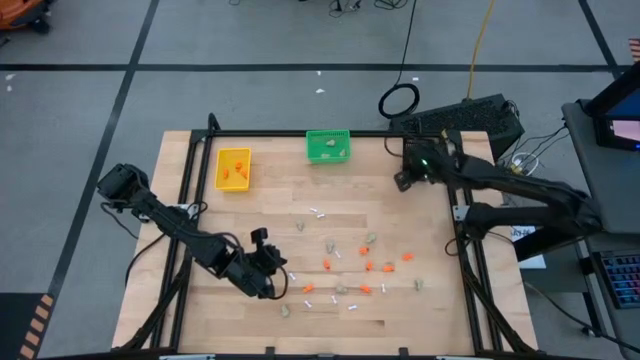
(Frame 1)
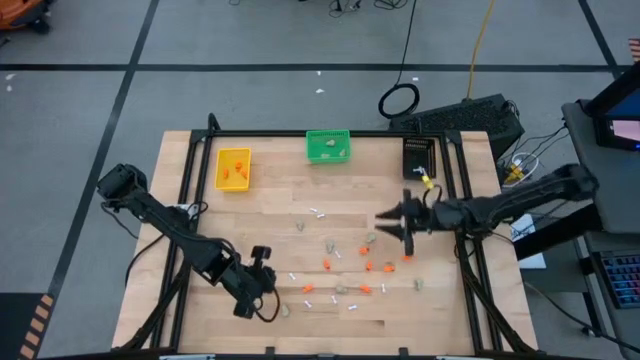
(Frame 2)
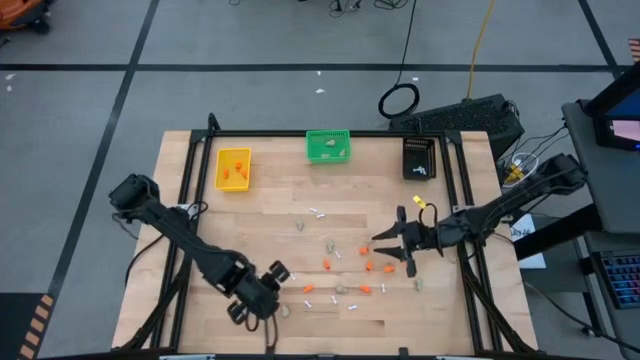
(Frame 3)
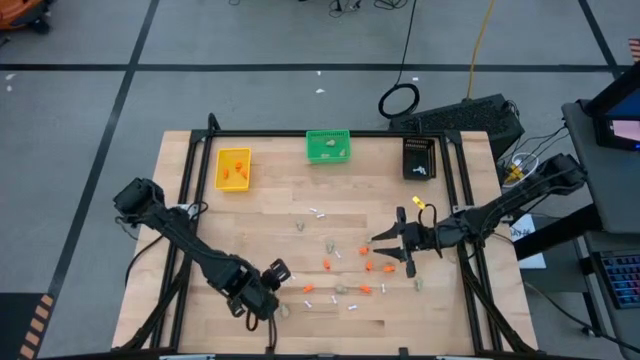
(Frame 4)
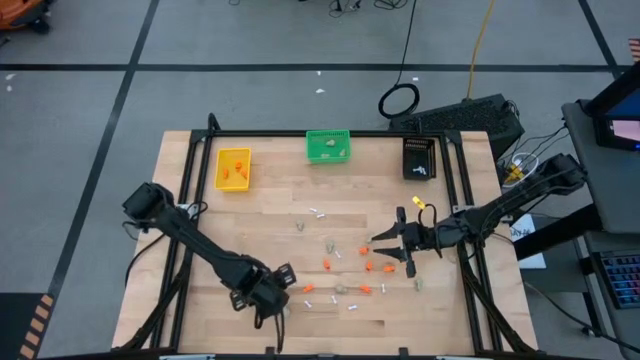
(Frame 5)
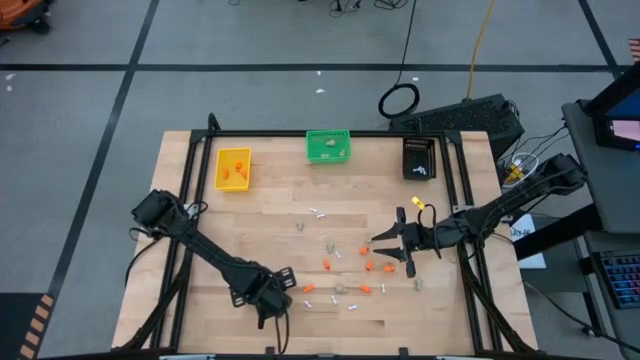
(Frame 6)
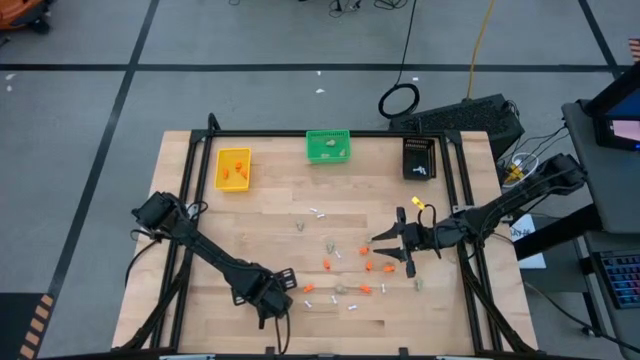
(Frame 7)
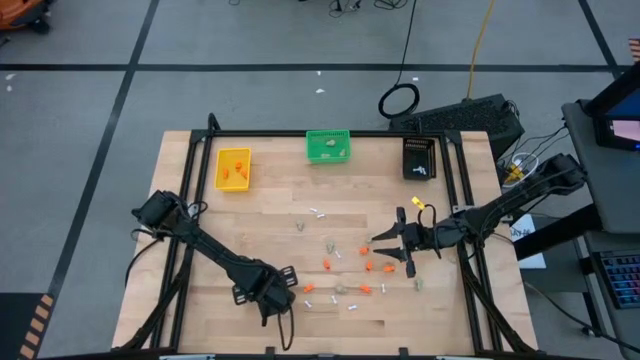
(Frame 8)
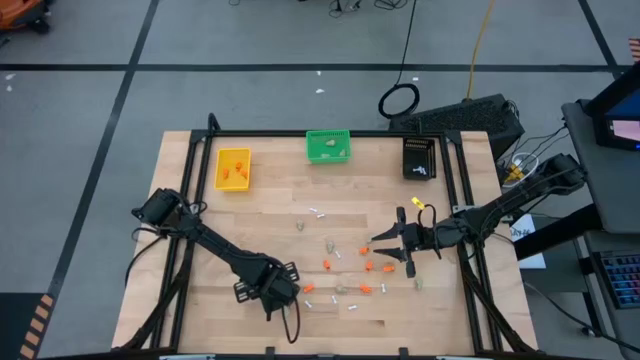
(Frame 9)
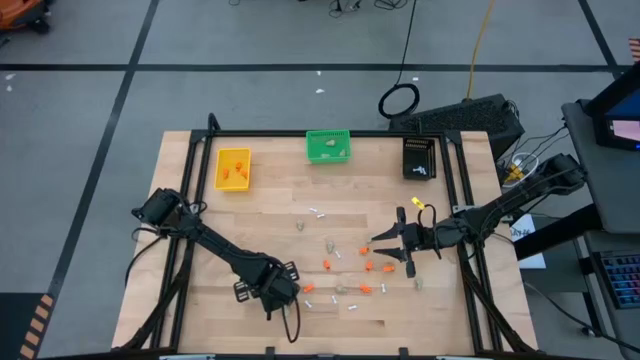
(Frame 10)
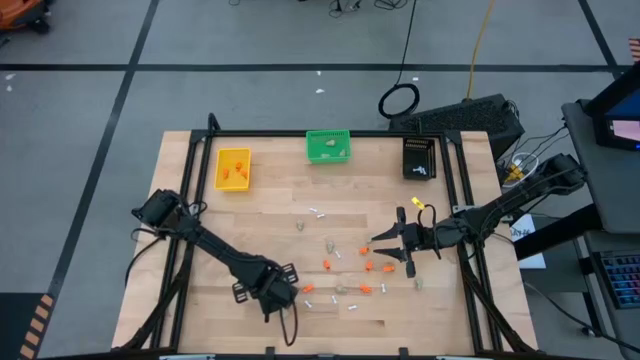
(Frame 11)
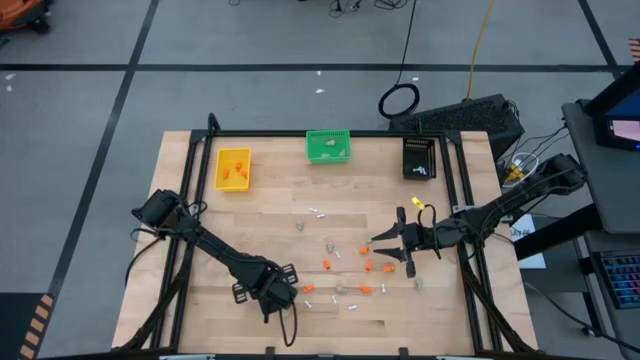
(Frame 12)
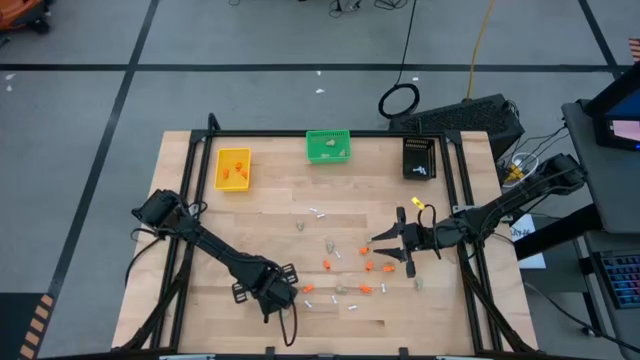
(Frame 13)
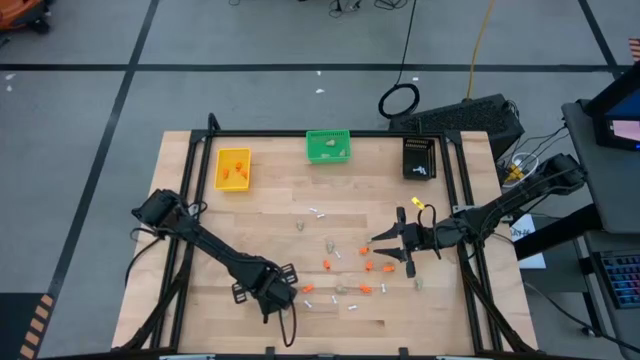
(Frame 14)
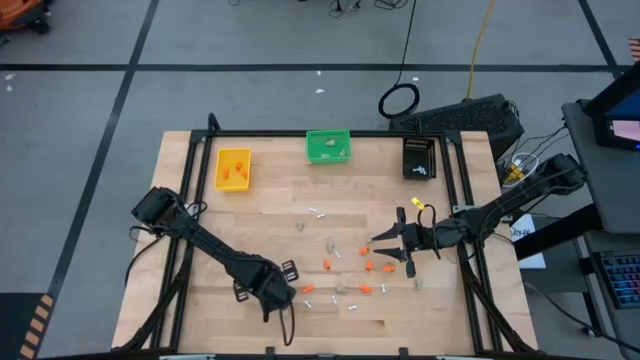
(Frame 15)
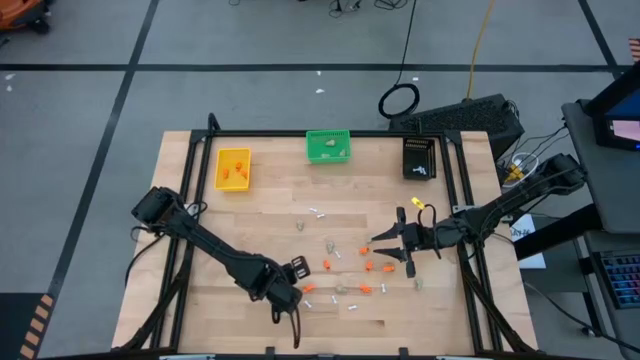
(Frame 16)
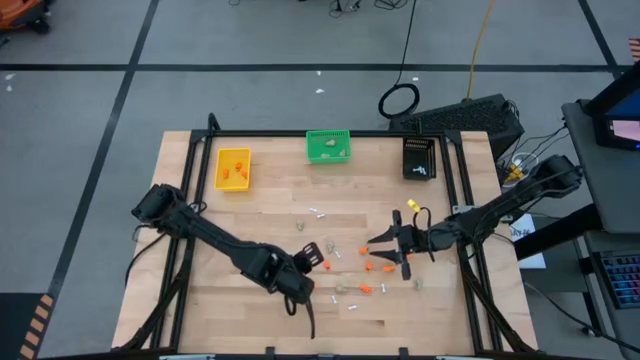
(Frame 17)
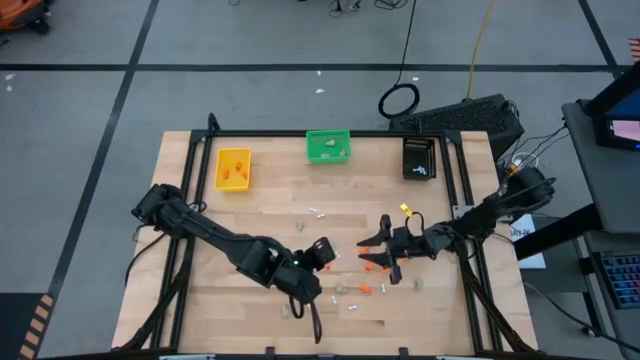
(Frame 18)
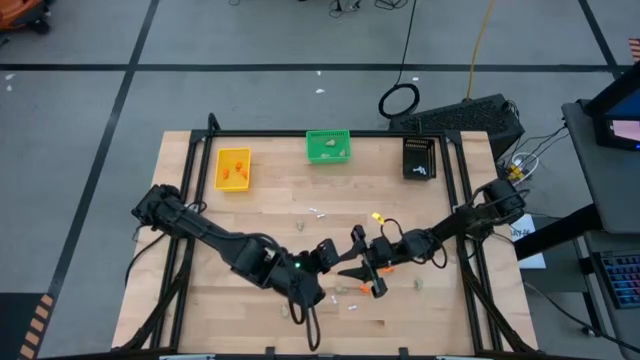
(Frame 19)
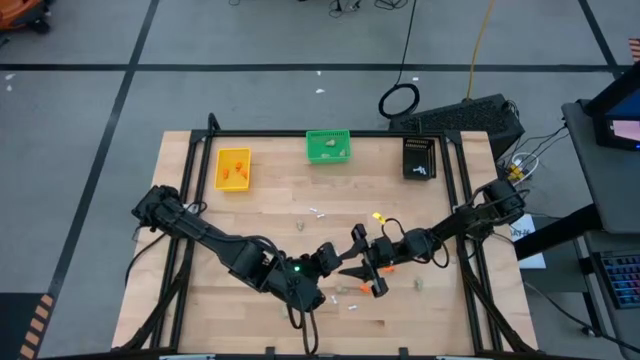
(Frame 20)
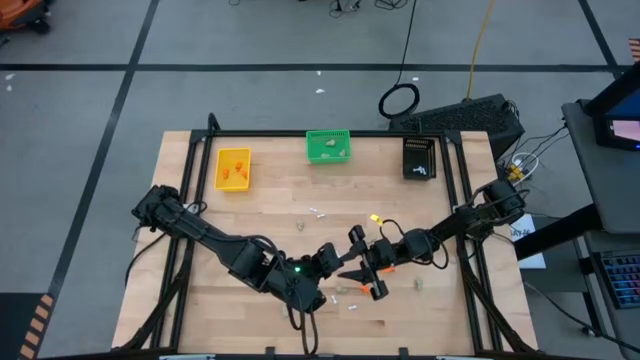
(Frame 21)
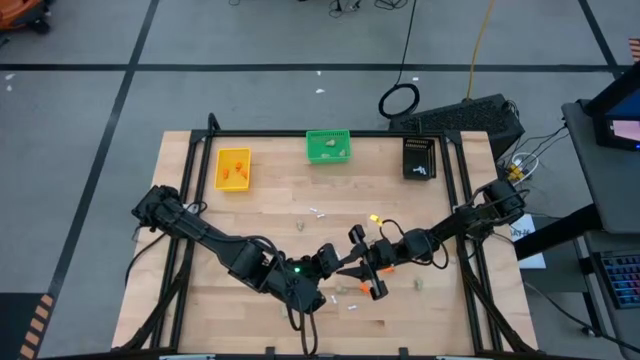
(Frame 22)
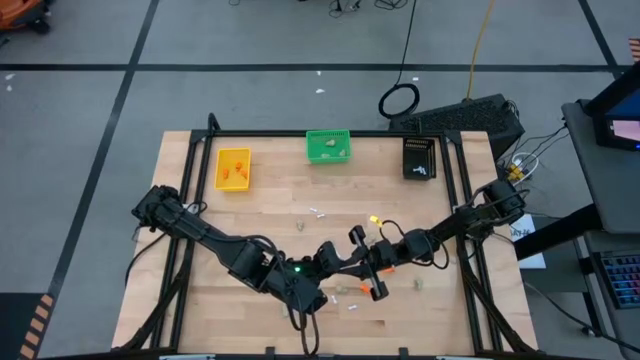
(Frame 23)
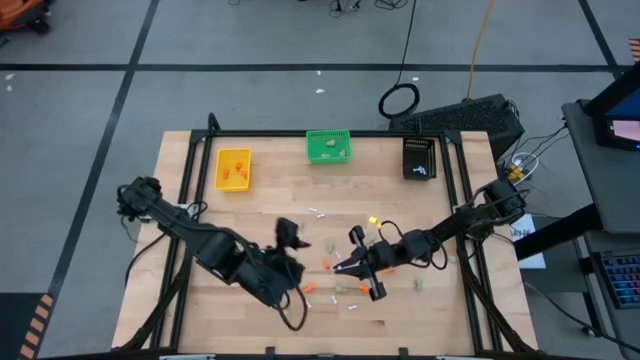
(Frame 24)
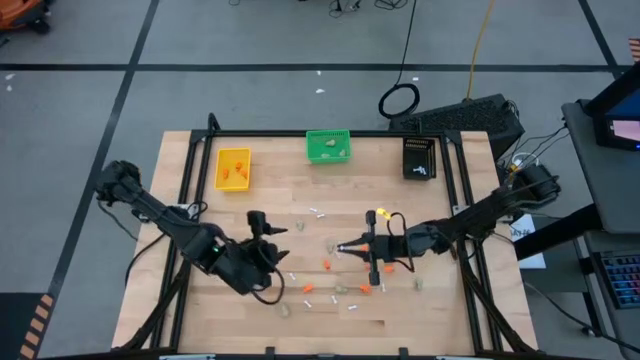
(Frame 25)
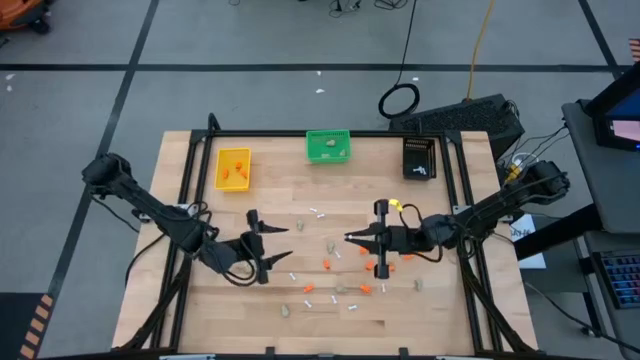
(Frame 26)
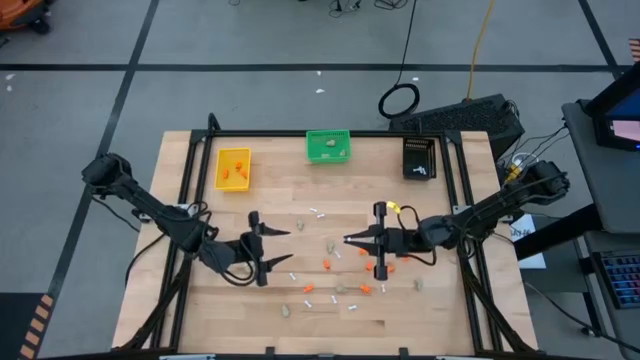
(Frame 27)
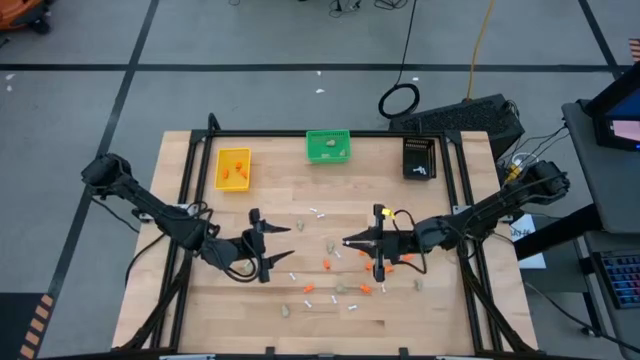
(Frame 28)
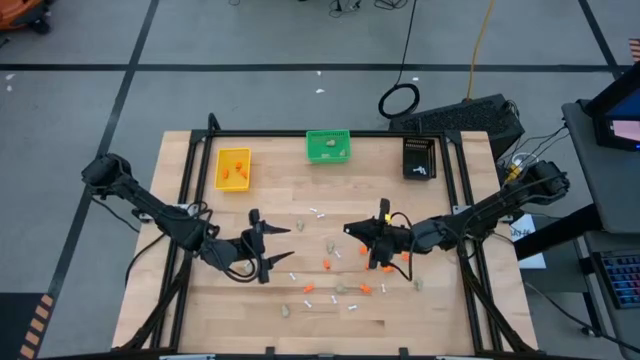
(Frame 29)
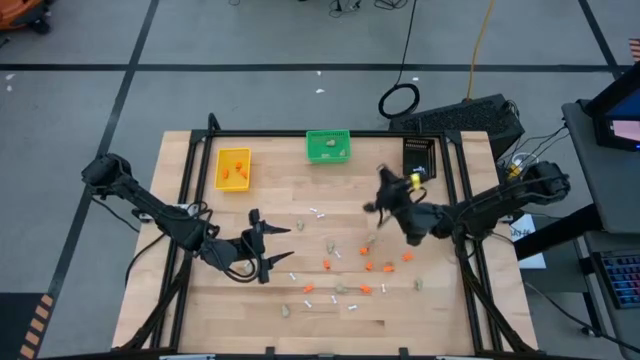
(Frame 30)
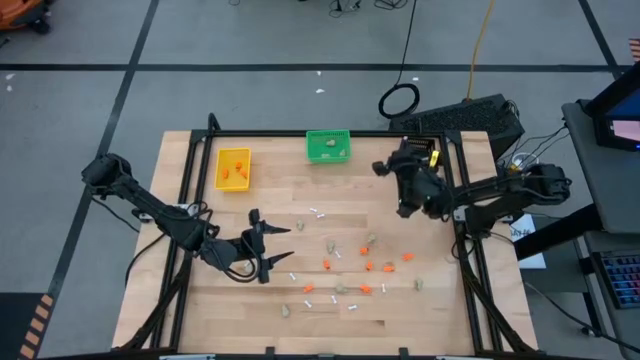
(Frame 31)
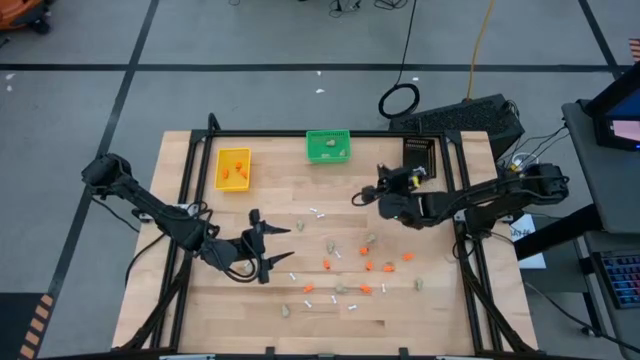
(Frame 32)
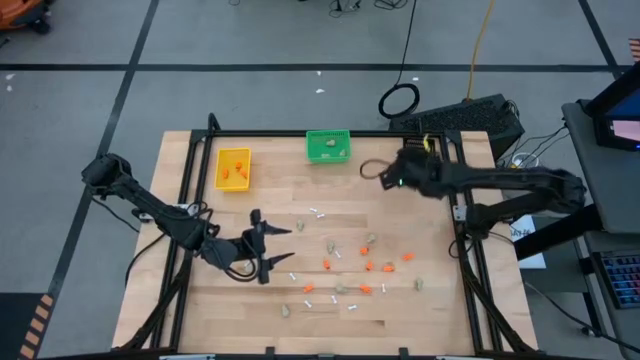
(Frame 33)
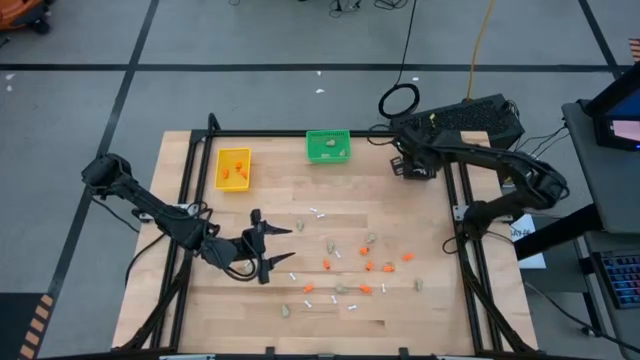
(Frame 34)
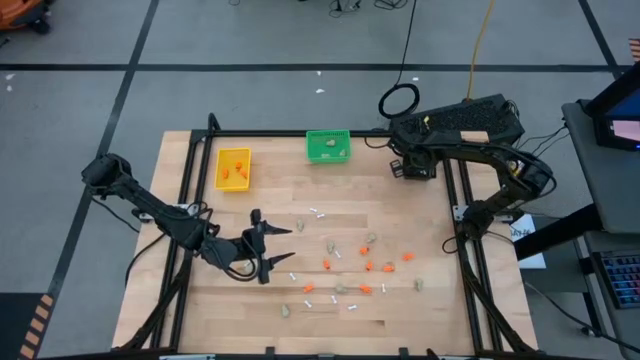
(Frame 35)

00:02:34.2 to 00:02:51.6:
Task: Sort Halloween decoration
Put the white bone toy into the black bin

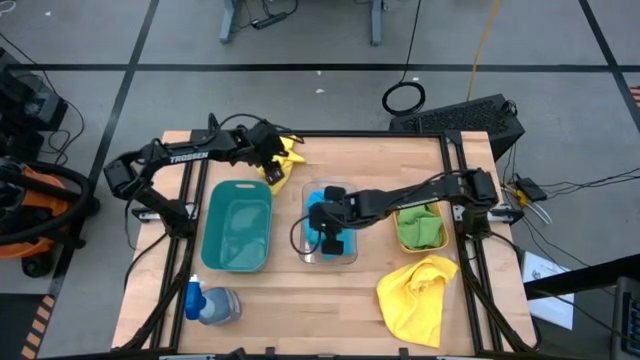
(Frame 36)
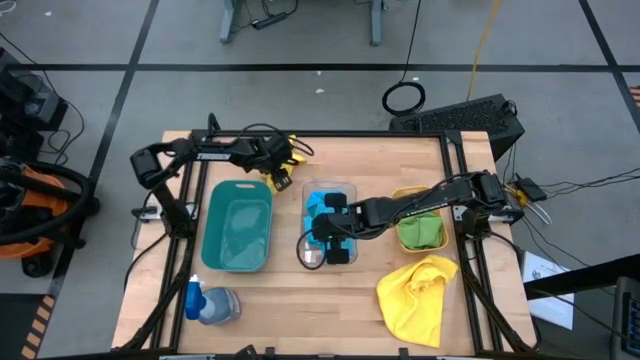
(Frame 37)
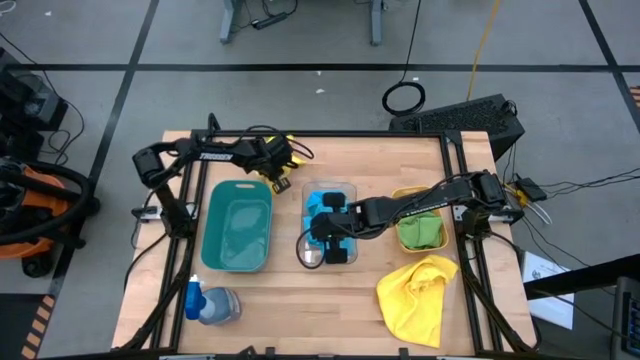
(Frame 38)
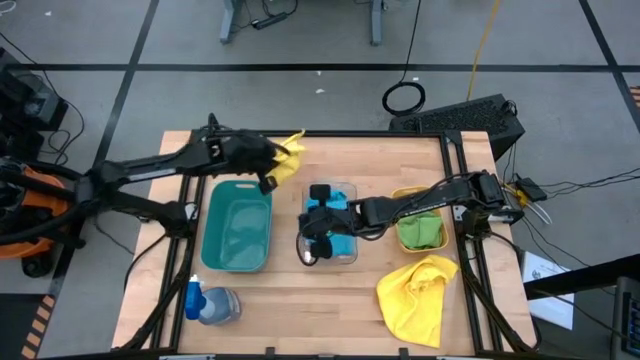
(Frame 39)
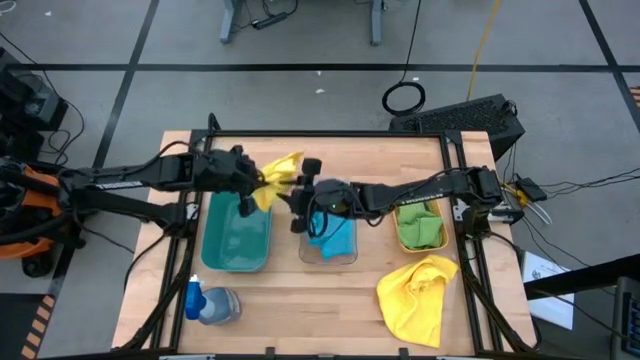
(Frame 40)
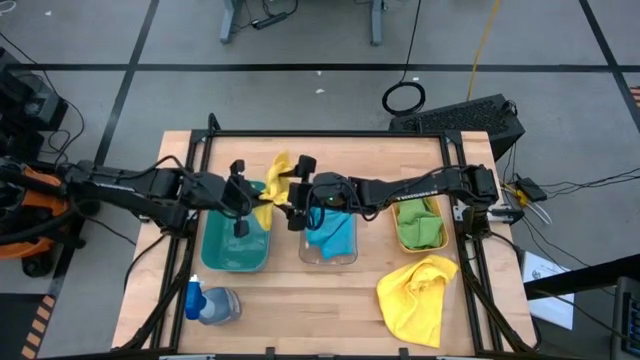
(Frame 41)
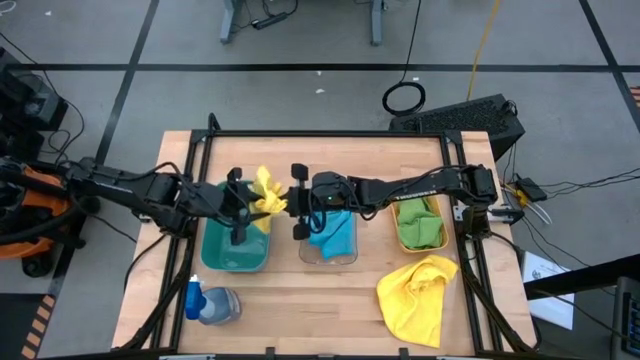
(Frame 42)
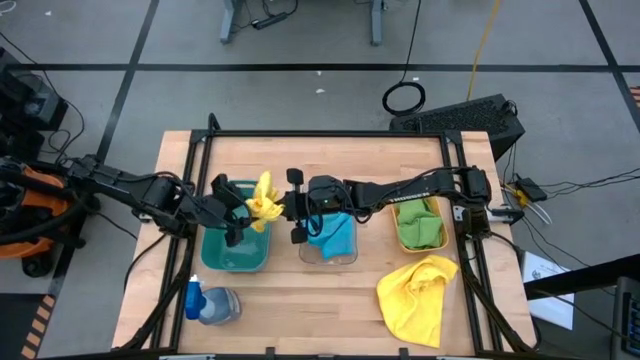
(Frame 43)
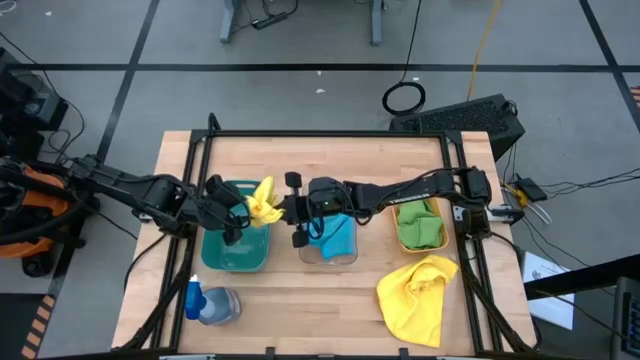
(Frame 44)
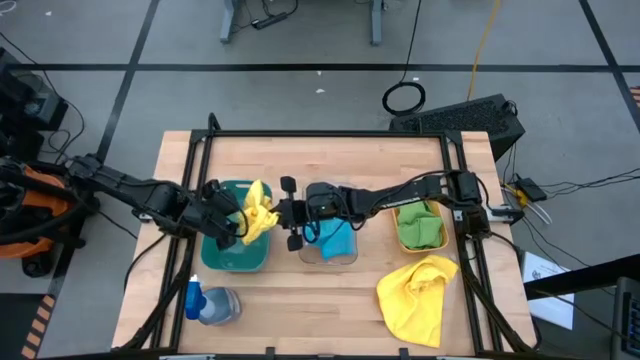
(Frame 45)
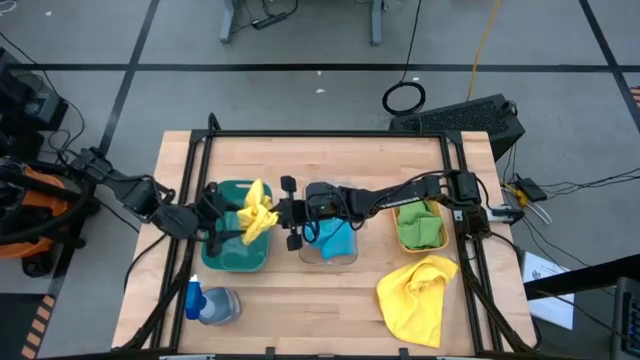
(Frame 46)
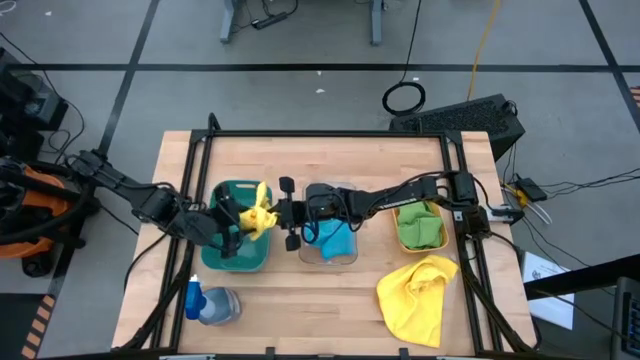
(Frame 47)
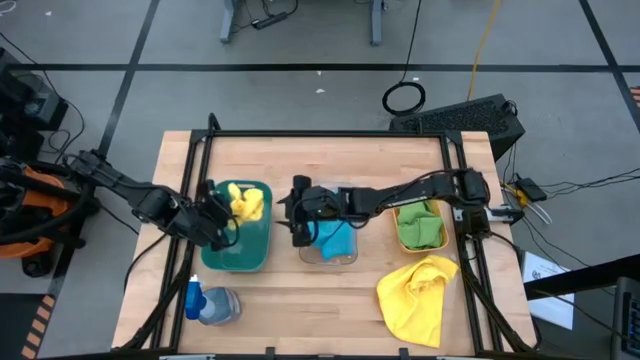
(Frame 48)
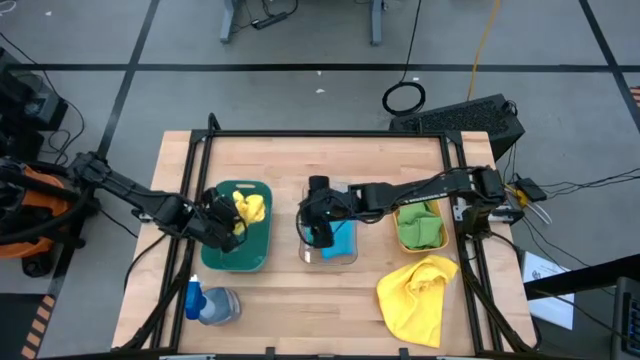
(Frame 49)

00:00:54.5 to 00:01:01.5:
Task: Sort microfiber towel by color & place in baskets
Put the top yellow microfiber towel into the green bin
